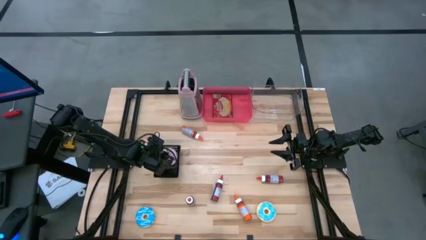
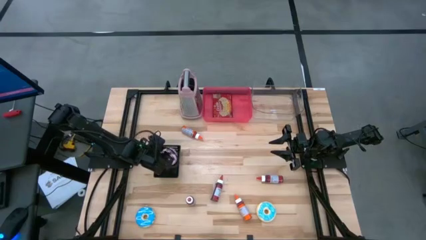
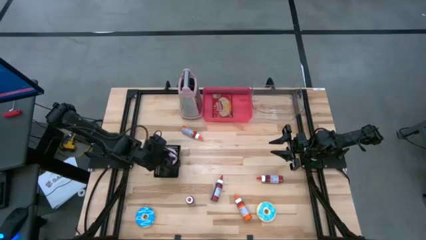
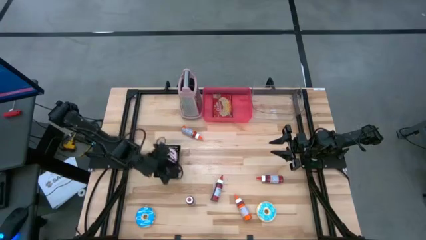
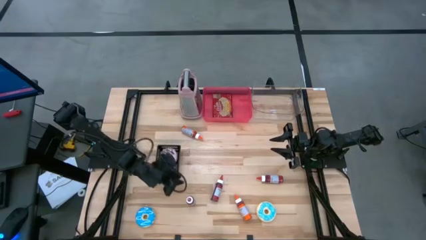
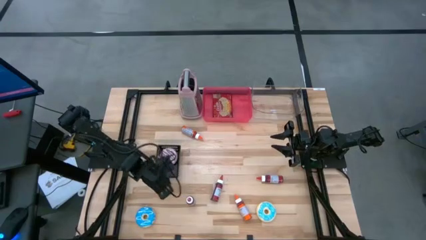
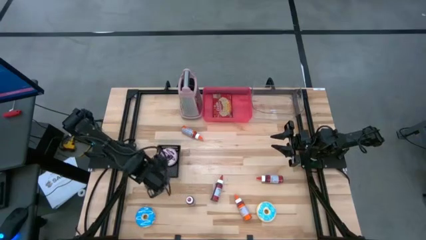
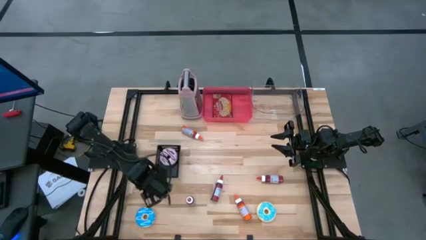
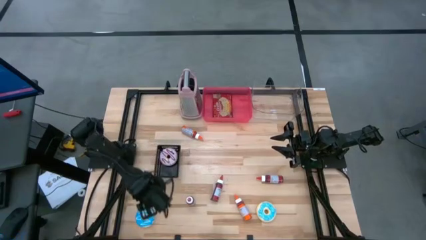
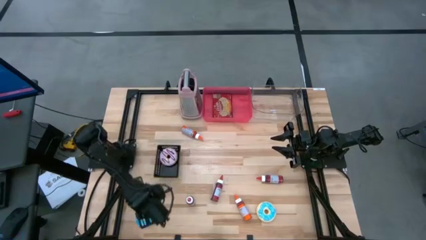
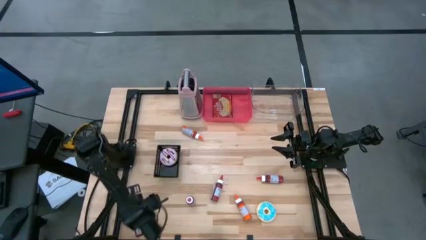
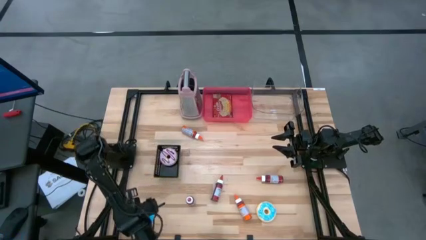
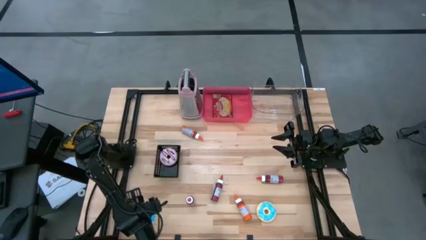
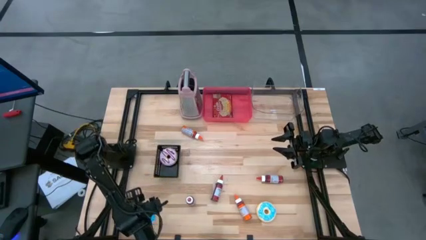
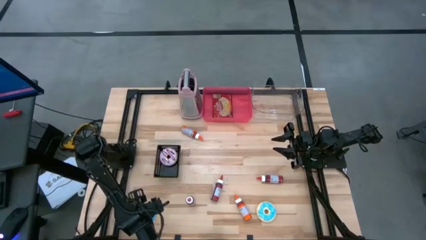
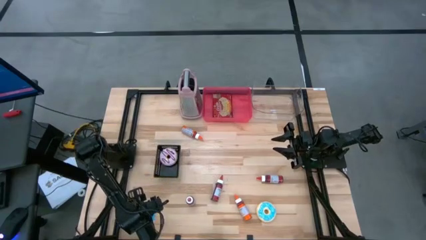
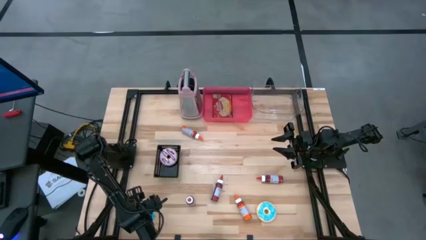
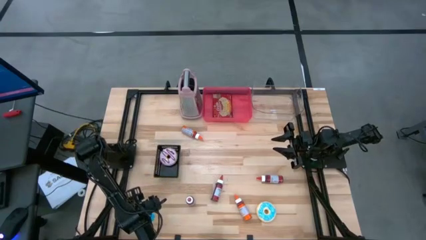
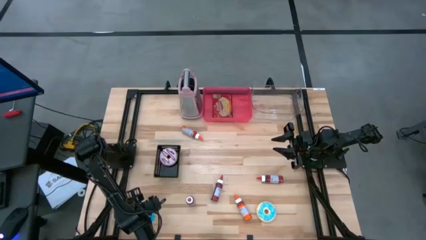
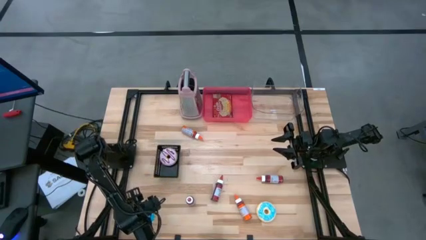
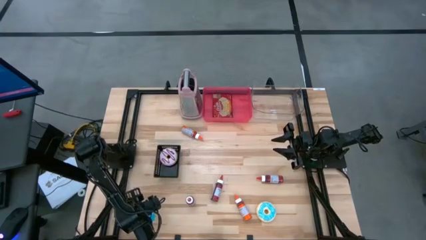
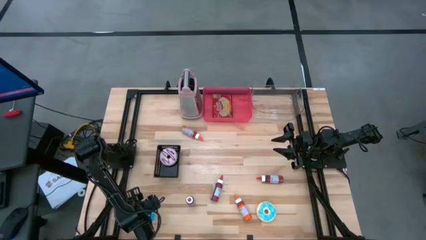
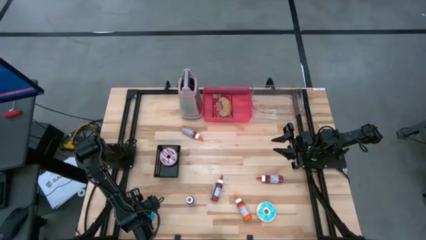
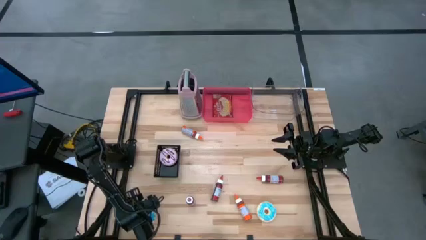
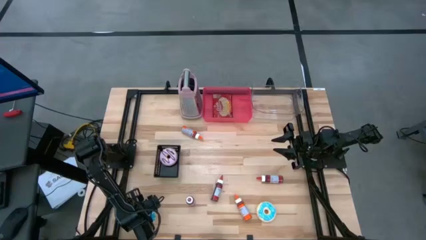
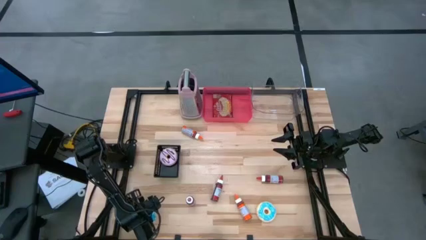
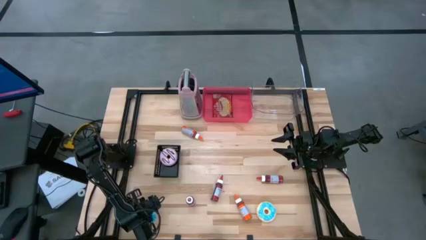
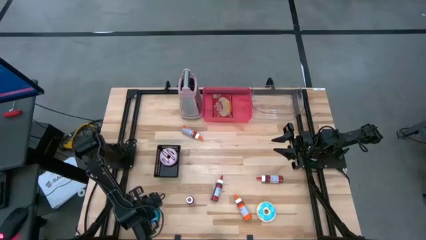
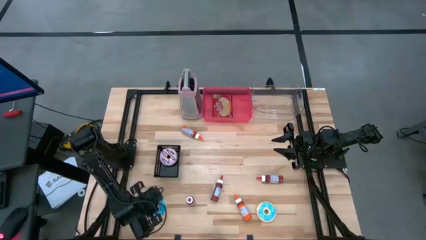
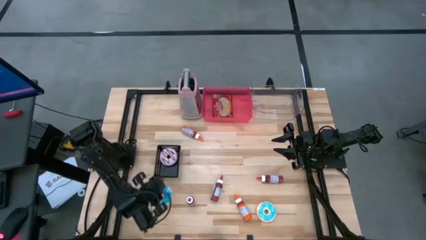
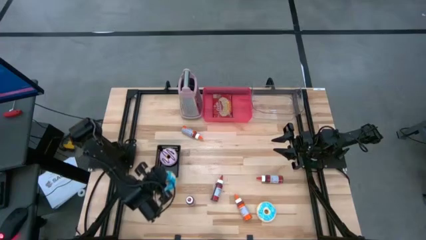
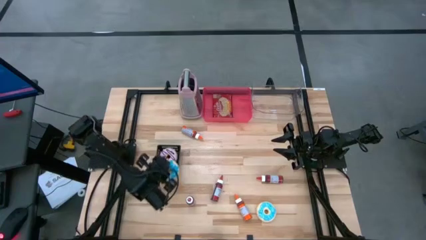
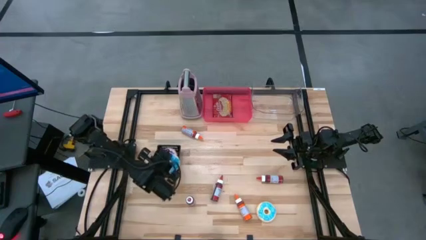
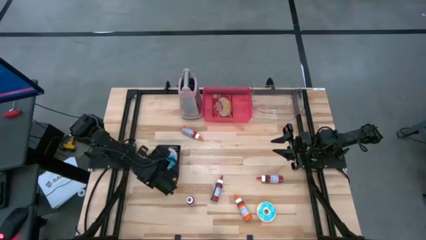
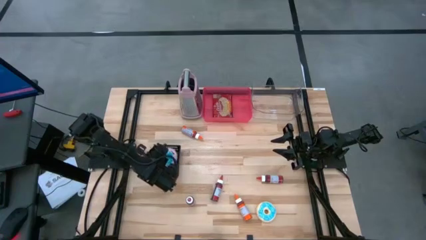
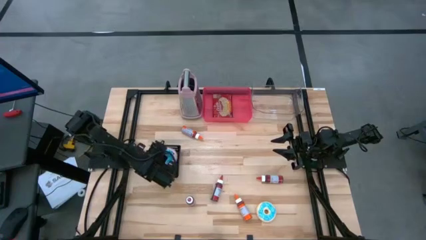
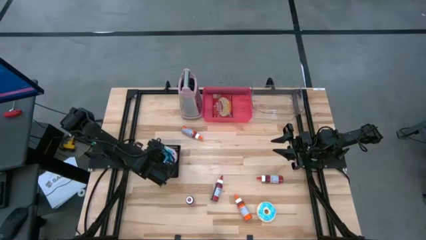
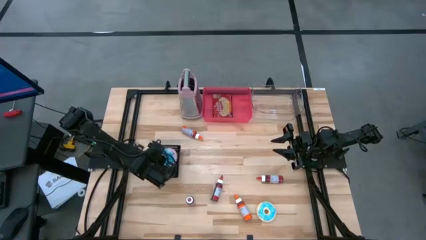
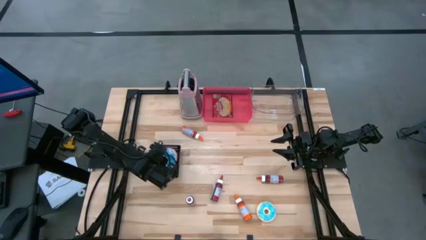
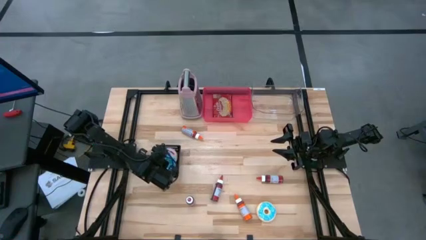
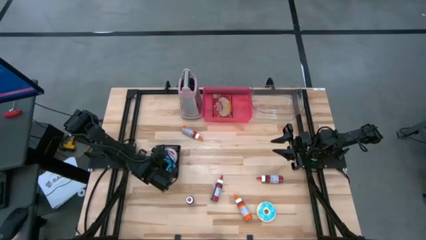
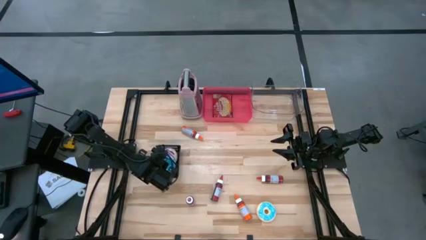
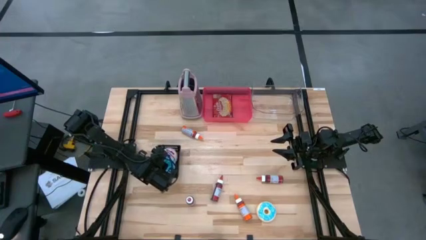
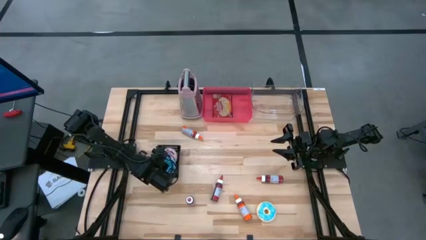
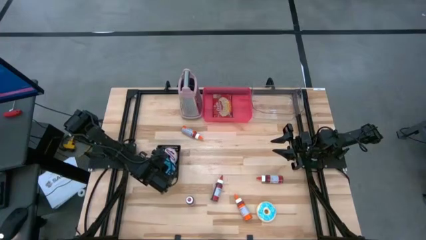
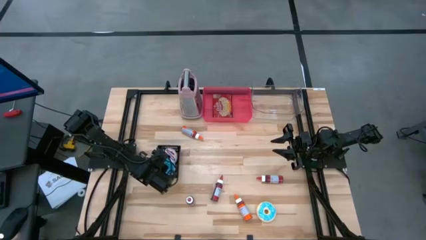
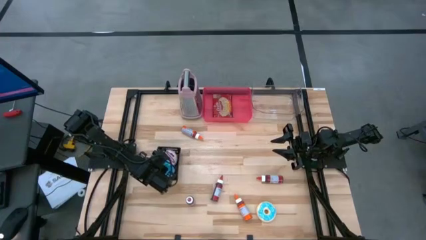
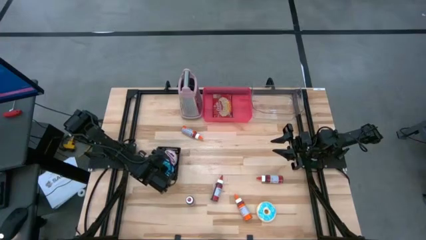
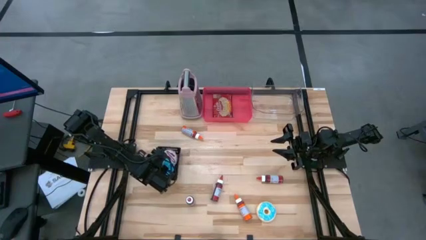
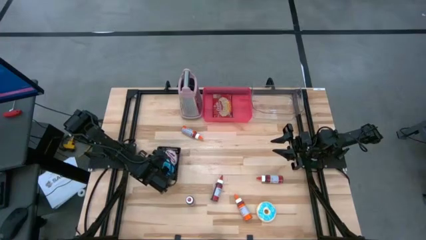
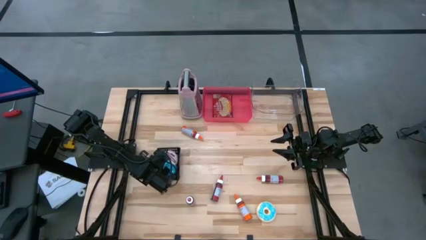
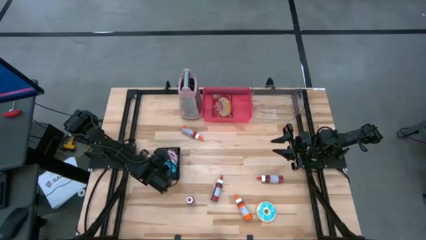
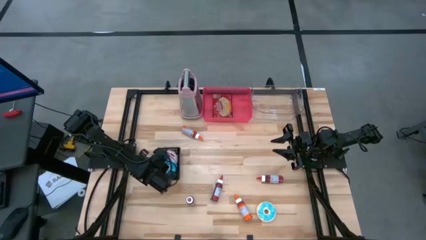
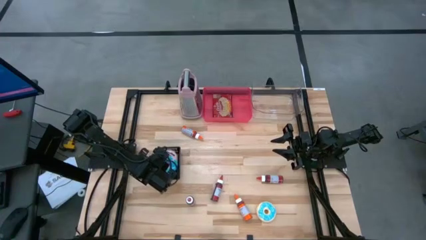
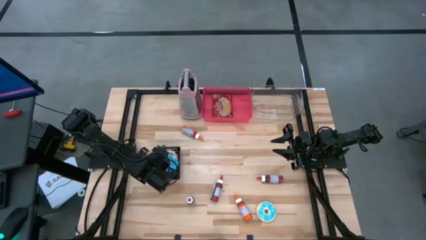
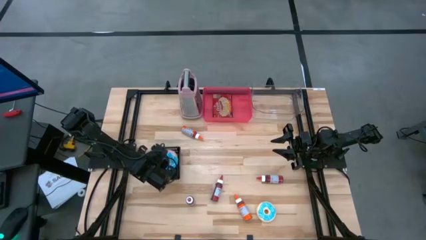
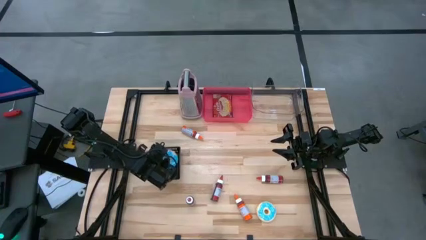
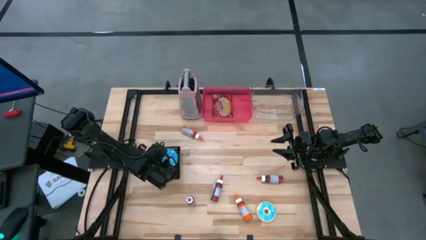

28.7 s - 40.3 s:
Put the blue donut into the black bin

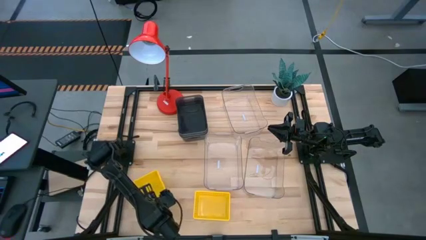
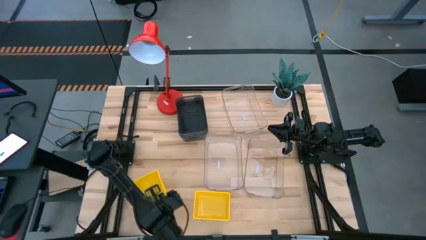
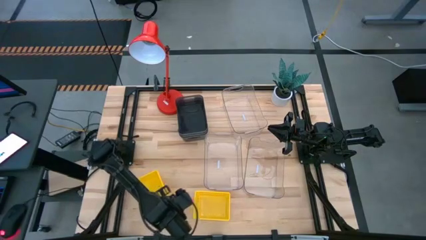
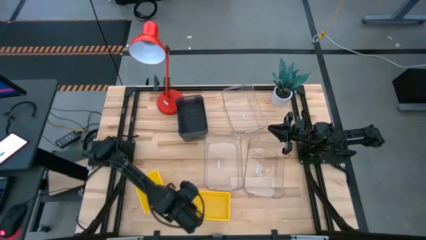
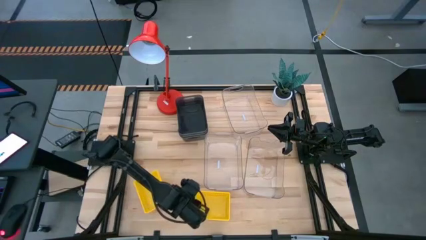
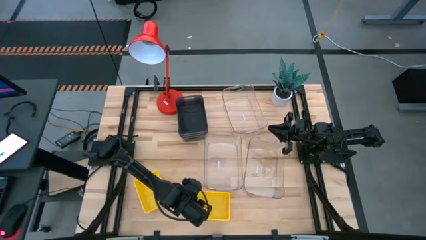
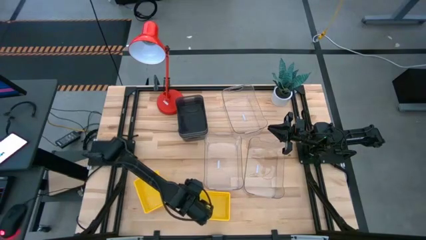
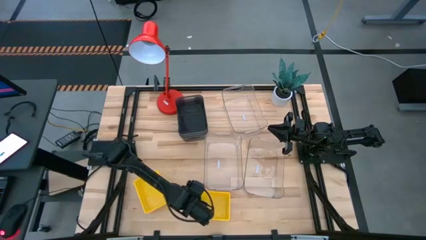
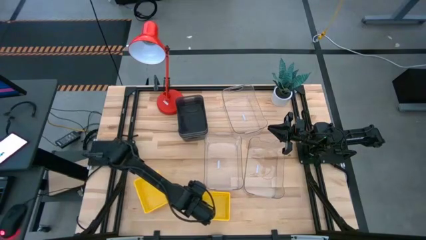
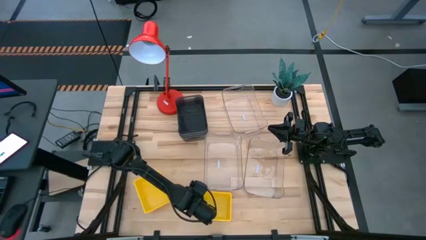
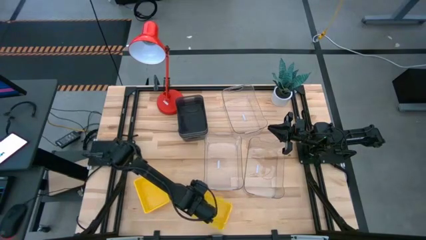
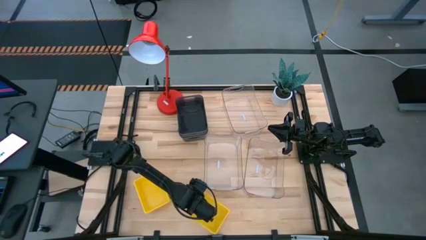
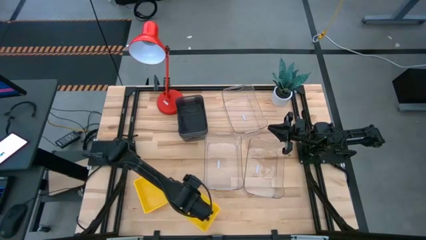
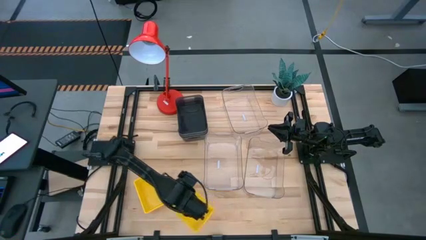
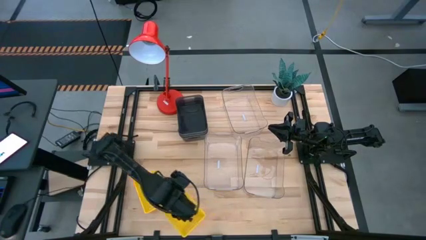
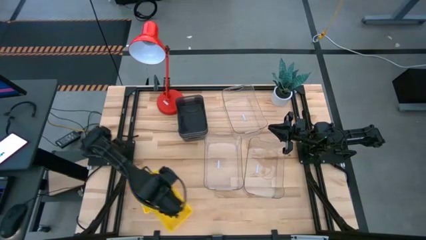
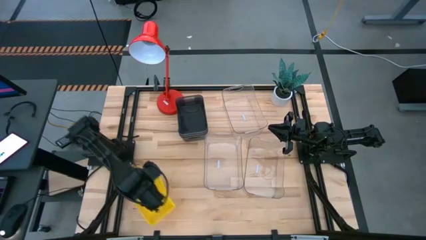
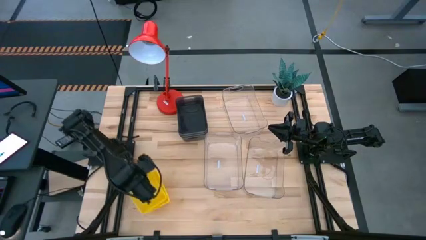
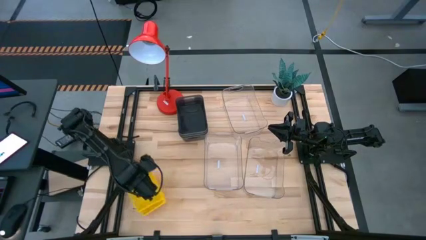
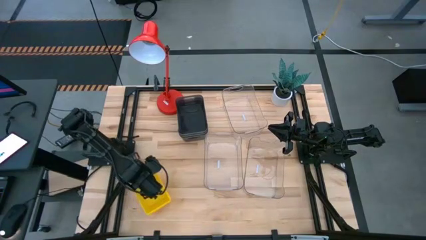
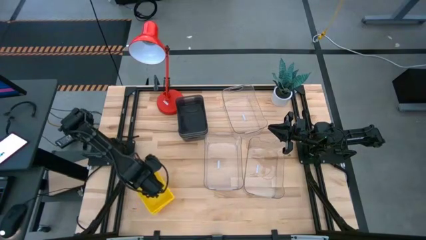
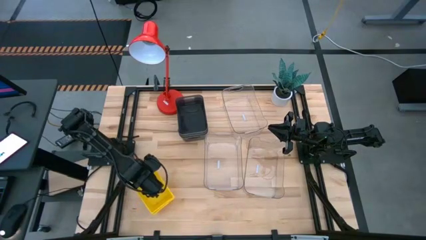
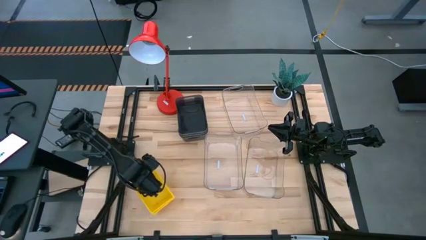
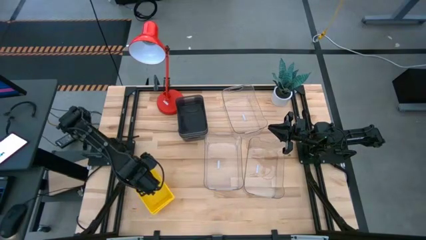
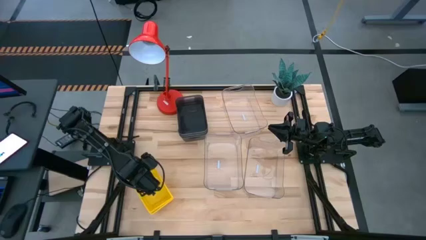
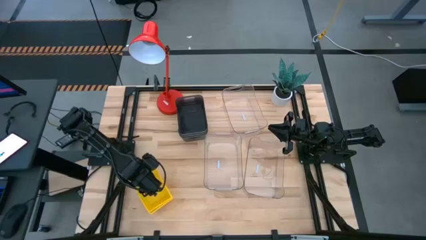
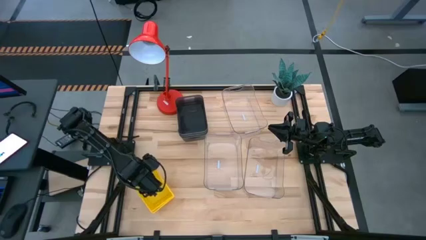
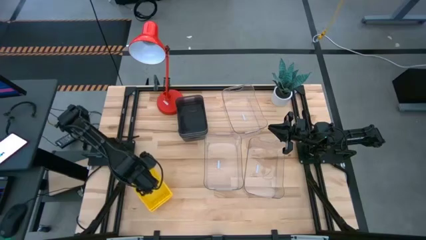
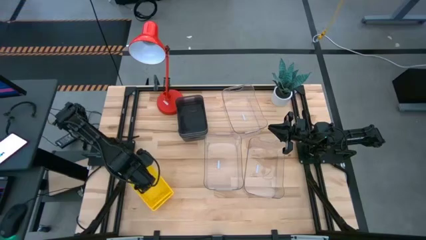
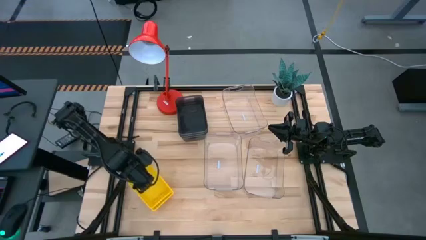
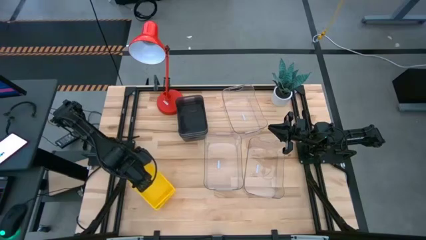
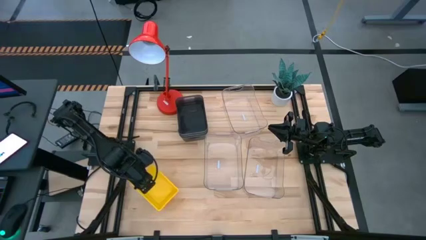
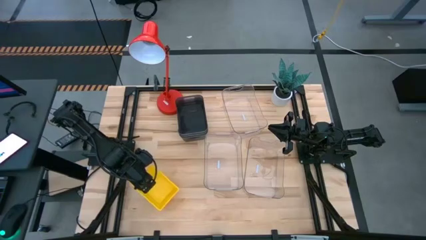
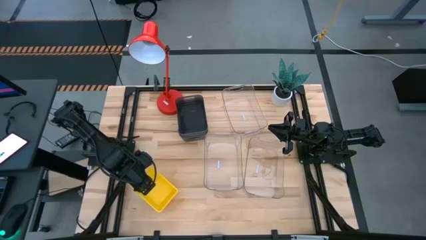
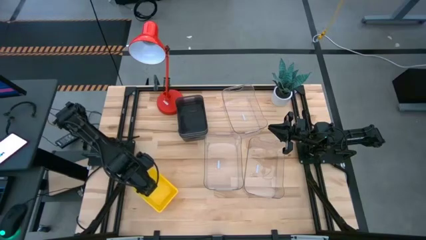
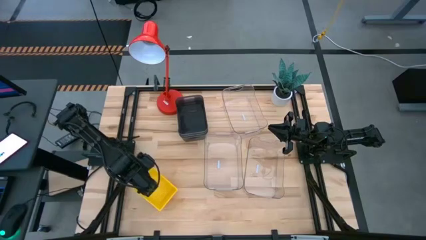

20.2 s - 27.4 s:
Stack the right yellow bin on top of the left yellow bin
